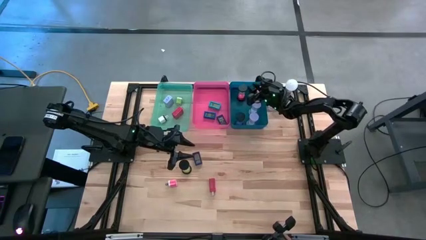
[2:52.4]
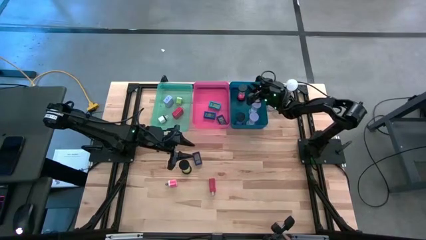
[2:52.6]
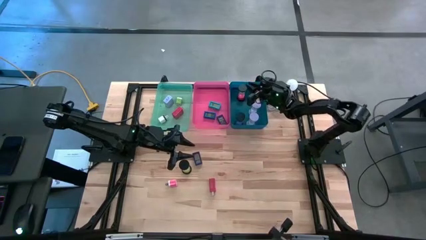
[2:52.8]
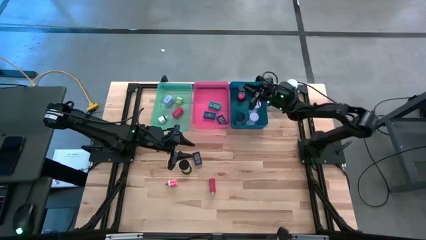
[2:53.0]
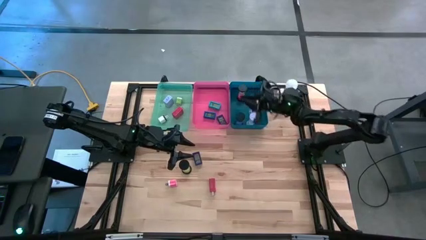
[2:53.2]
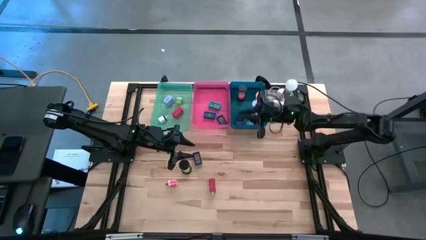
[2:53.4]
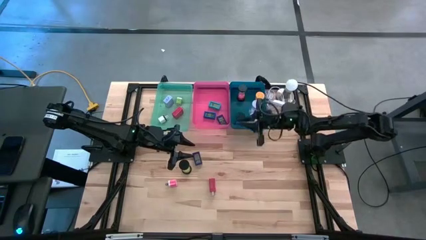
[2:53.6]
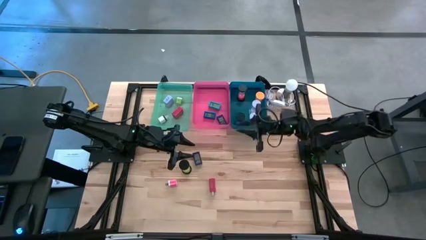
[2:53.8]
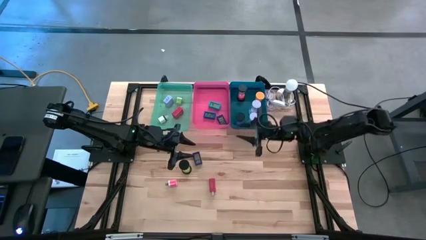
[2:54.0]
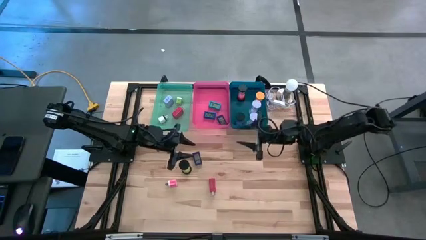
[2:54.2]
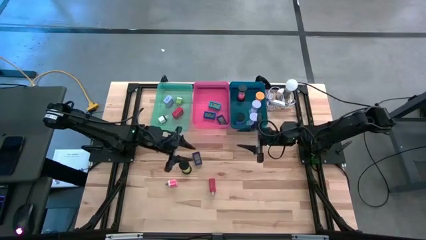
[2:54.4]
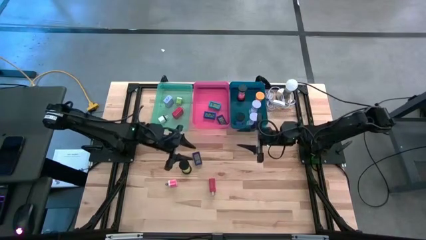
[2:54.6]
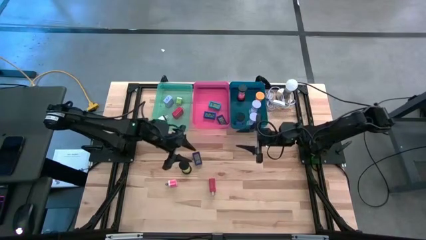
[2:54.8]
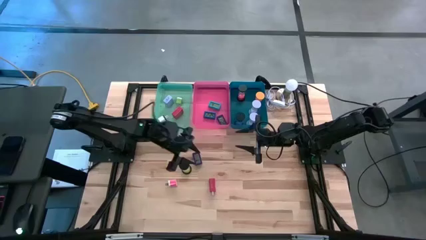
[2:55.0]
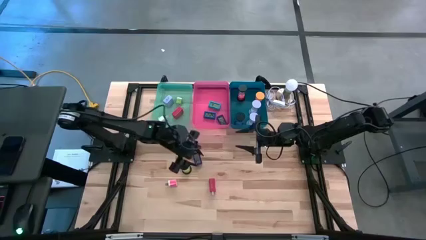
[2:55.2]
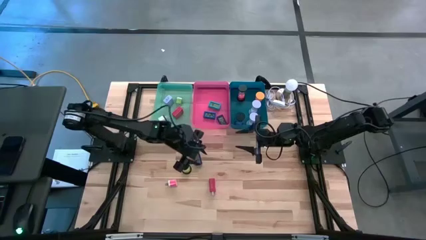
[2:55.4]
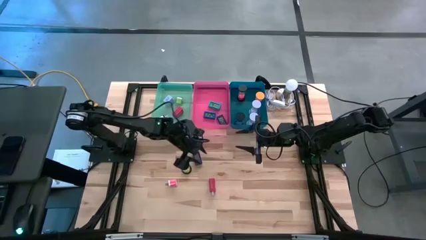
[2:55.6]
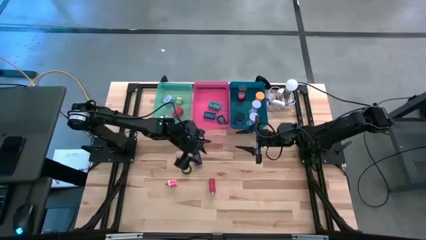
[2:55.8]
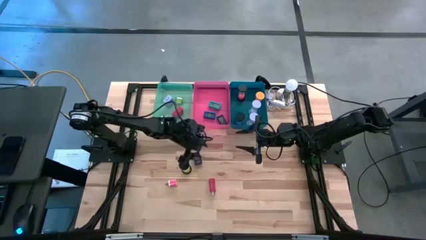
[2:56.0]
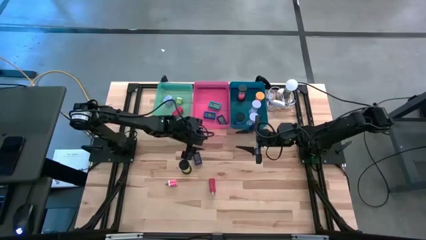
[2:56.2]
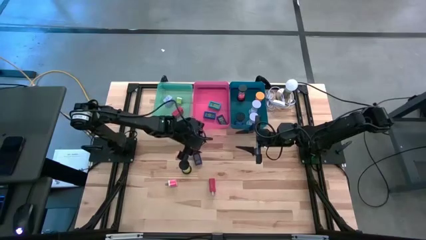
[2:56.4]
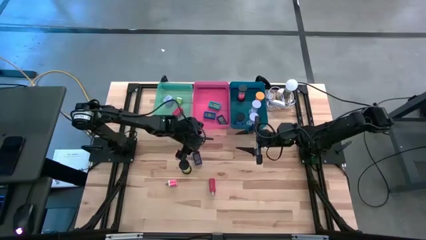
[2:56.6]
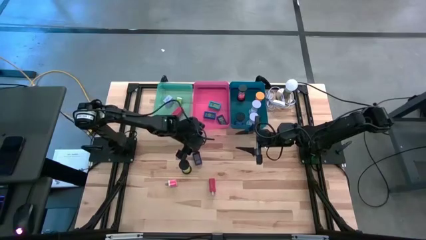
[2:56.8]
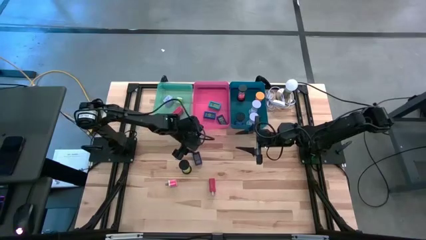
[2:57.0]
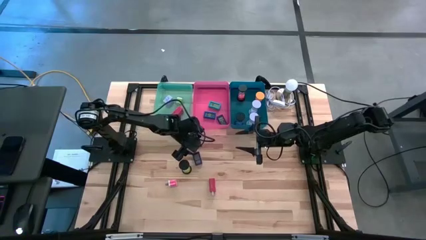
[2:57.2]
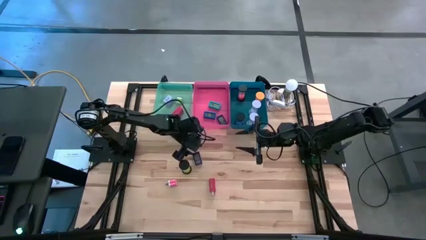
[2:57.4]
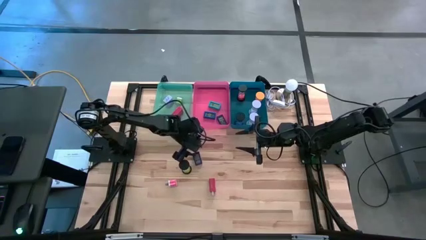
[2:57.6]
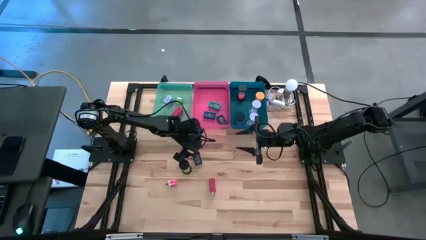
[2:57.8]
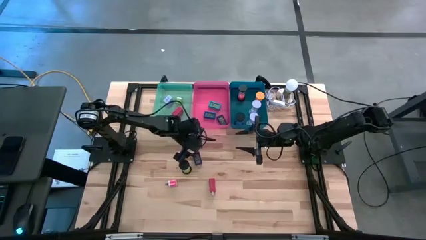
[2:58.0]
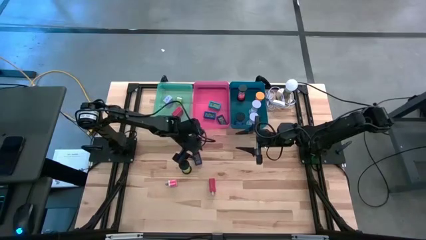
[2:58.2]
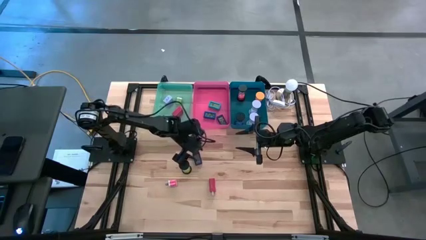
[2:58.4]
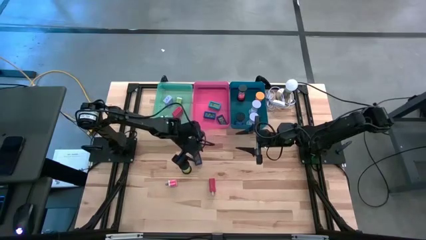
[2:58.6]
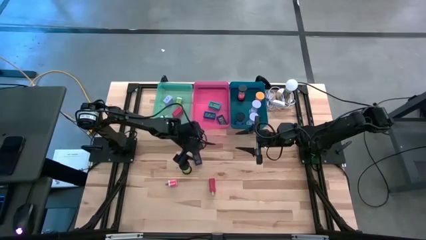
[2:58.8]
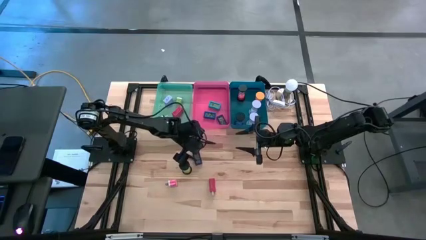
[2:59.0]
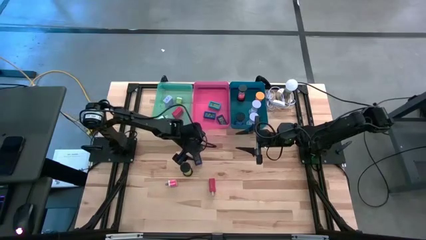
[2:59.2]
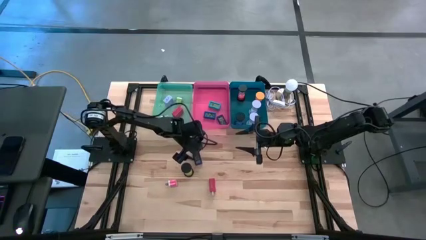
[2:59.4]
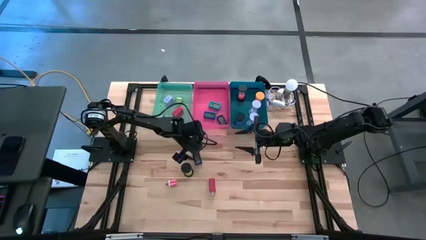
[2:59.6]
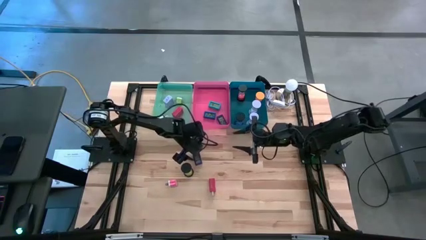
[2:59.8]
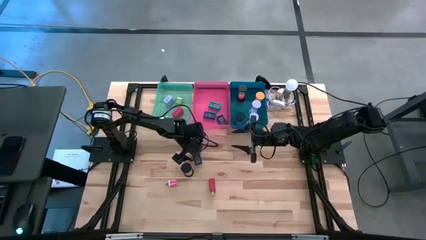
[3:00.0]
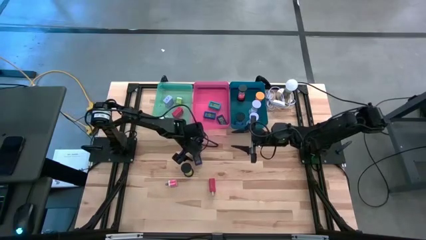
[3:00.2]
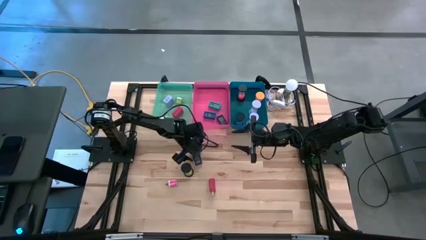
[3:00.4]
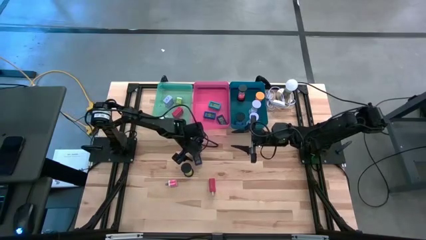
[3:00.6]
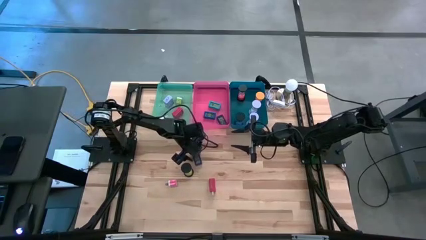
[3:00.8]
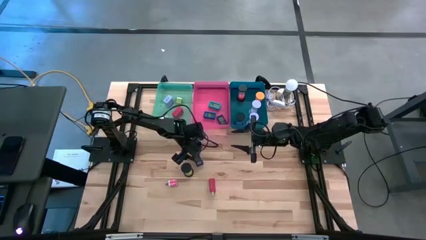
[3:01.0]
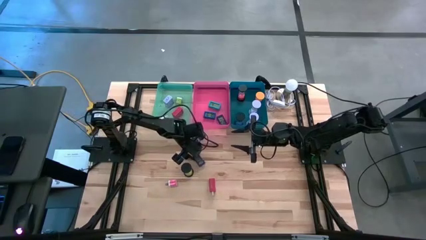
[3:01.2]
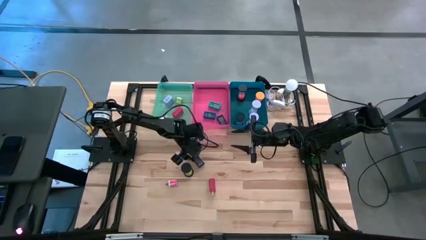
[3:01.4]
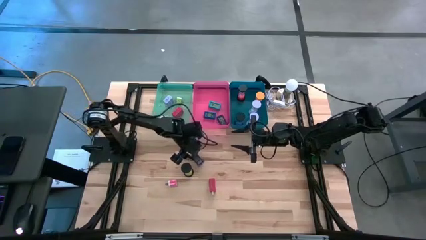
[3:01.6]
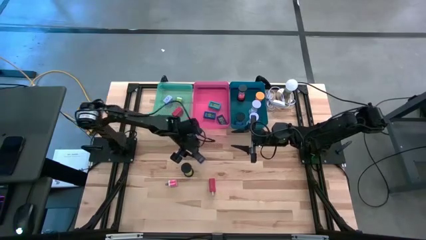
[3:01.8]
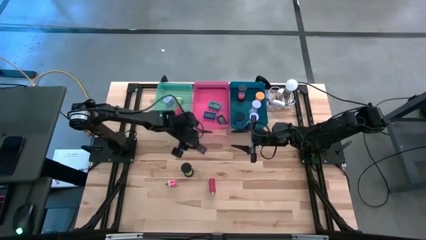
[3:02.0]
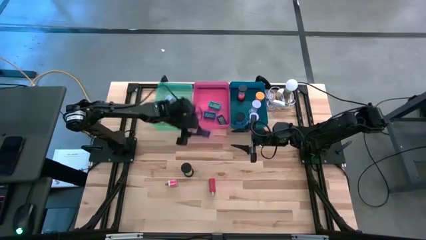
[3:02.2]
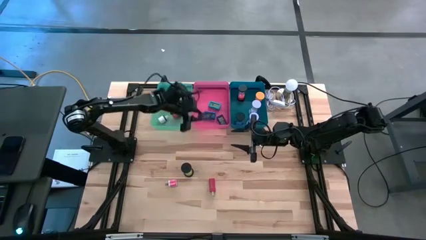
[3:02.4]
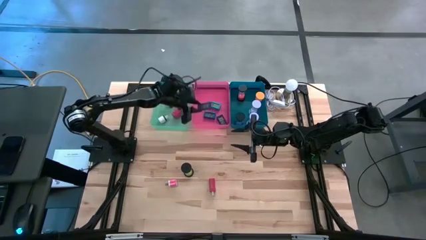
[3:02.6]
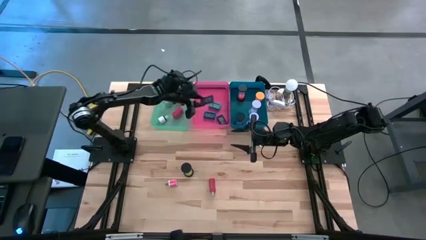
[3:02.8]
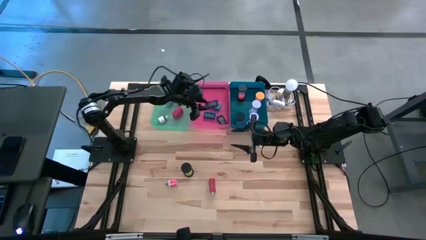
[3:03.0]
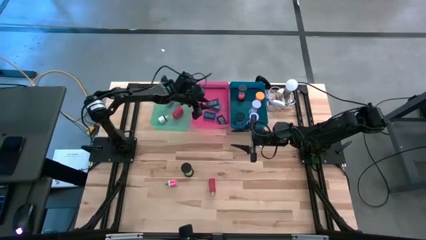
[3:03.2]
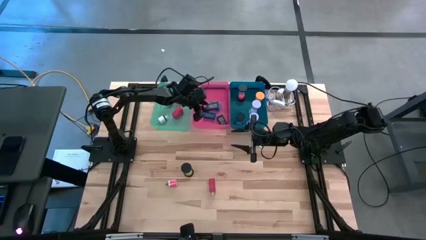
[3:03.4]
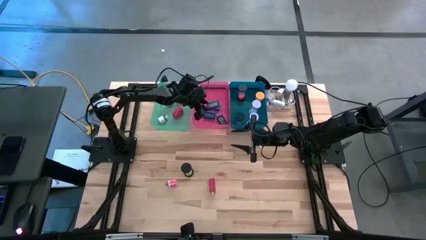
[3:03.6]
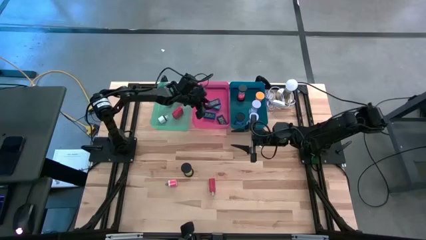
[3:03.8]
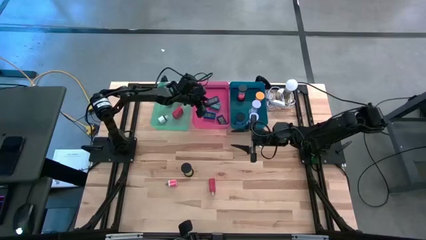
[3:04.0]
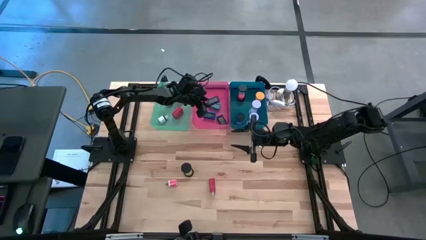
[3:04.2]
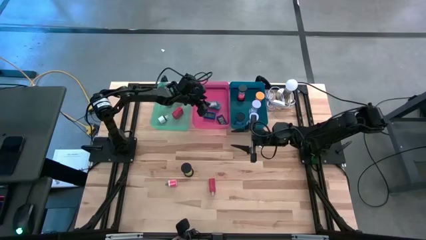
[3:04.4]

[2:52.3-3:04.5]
Task: Pick & Place Office items
Put the dark blue digital clock into the pink bin

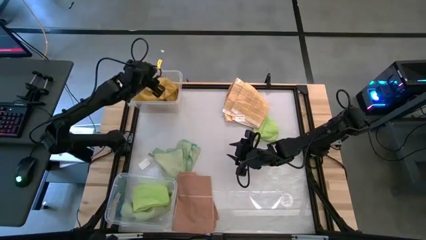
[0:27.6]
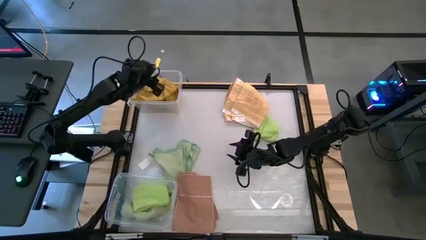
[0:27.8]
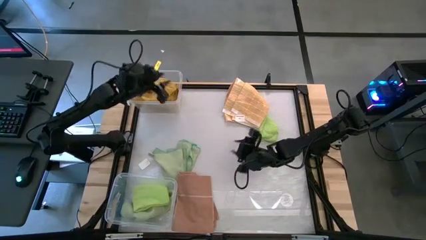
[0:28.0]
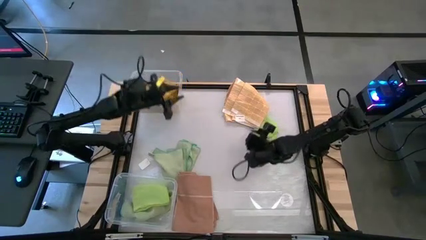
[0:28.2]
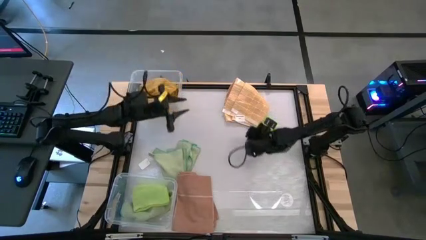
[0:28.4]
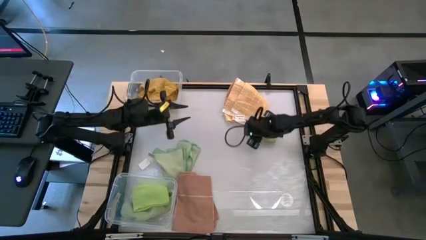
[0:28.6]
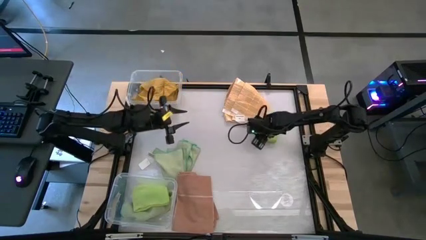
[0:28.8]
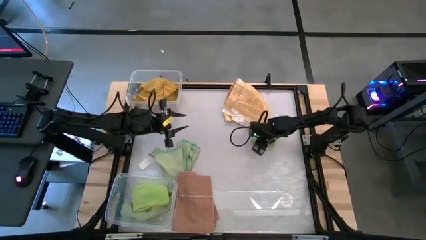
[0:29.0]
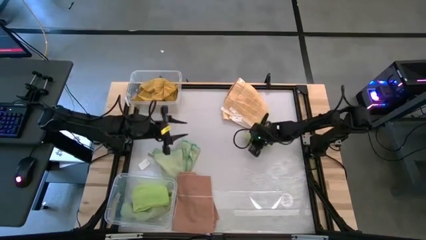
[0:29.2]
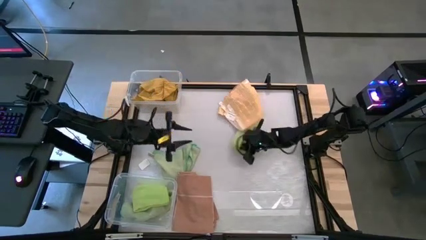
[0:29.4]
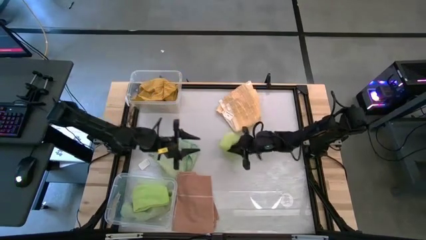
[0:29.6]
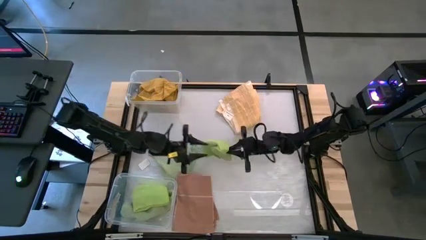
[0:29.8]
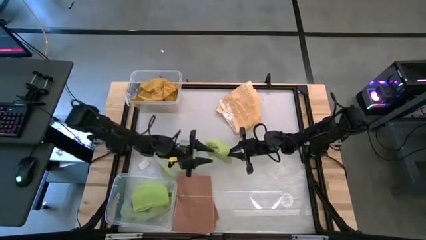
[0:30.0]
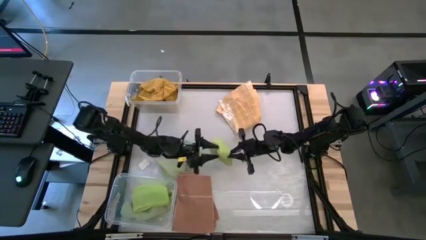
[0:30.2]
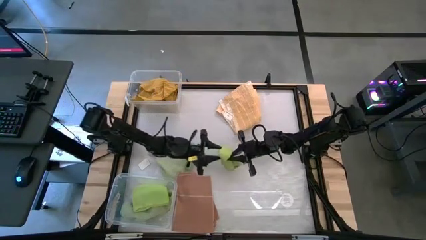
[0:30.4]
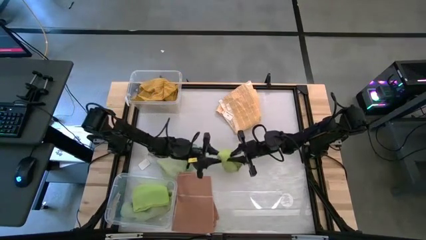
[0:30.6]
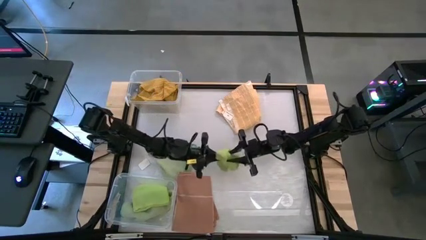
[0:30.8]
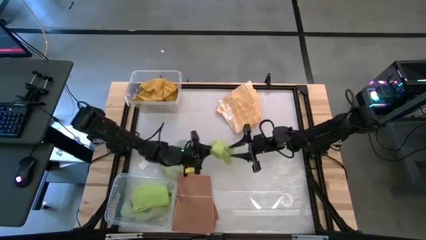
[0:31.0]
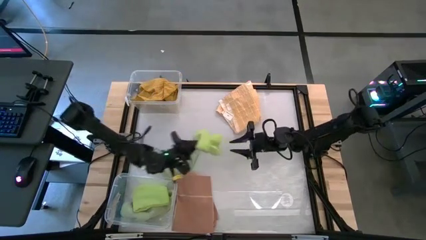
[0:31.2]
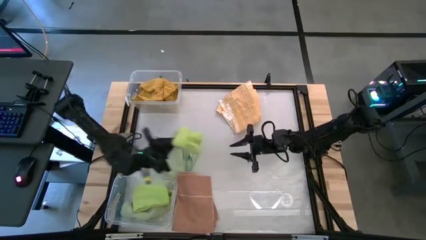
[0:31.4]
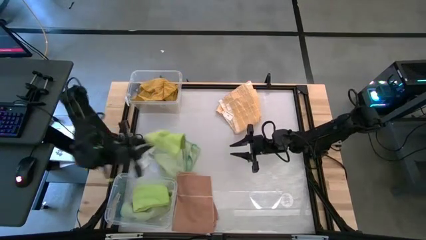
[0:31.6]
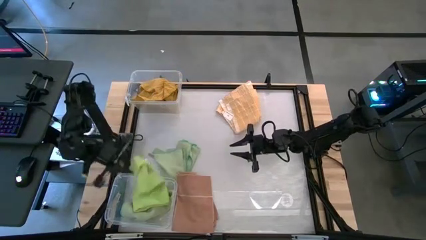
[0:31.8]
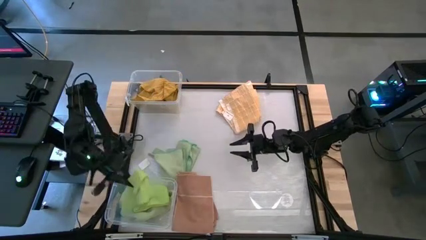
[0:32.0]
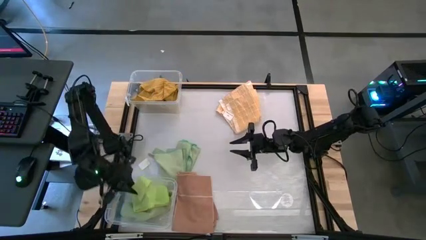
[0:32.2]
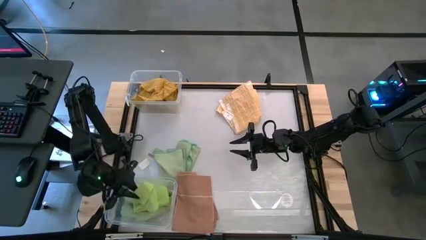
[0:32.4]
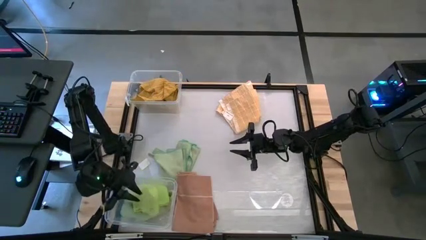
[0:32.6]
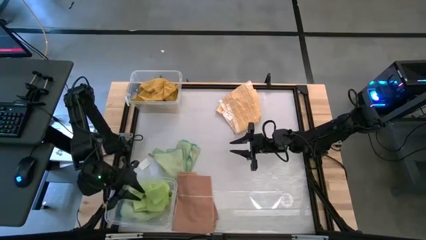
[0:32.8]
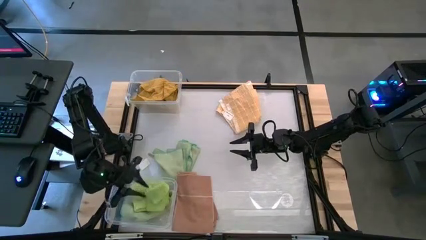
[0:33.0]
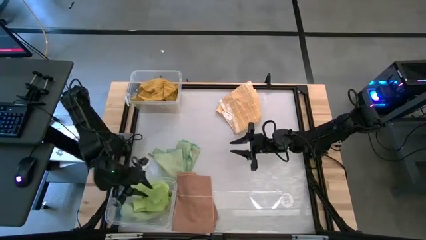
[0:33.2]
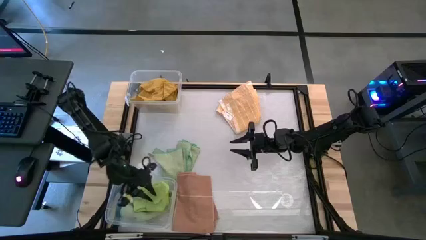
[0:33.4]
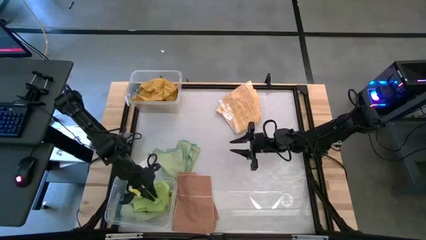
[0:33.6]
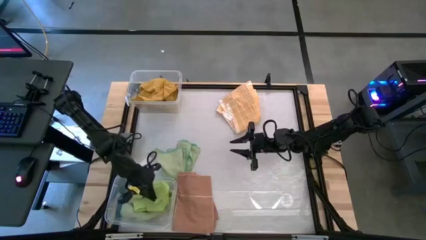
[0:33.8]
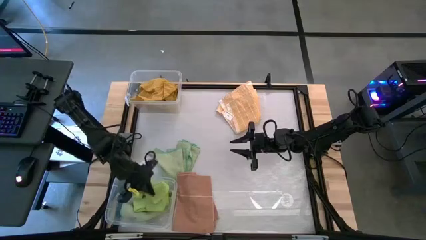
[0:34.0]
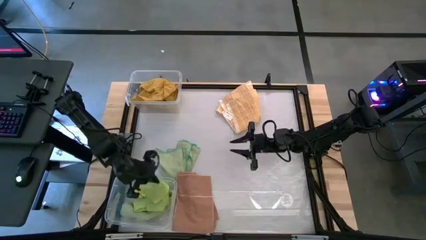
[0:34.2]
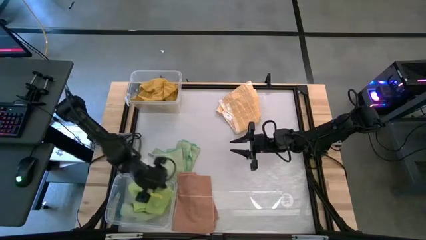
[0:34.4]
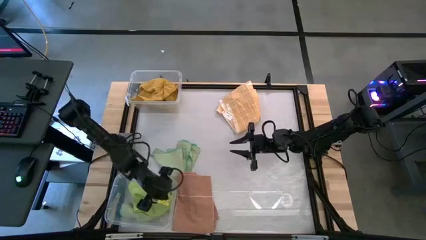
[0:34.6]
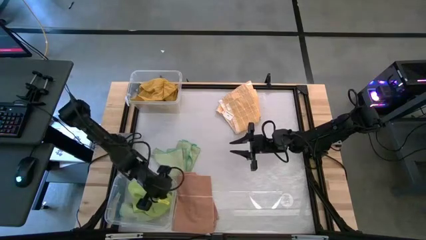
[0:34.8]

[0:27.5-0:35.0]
Task: Sort towels by color in basket
Put the light green towel into the bottom transparent bin
